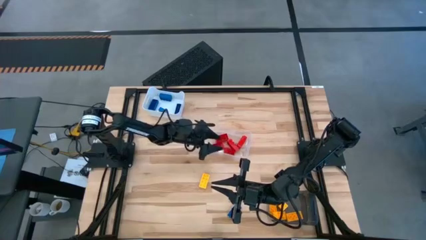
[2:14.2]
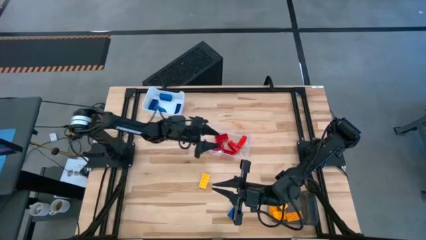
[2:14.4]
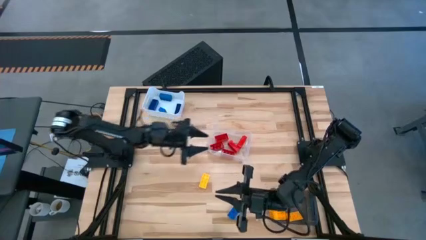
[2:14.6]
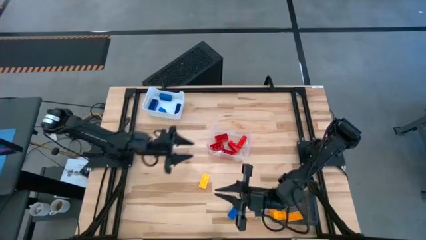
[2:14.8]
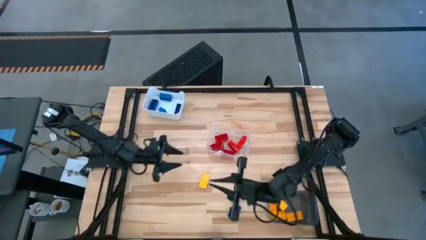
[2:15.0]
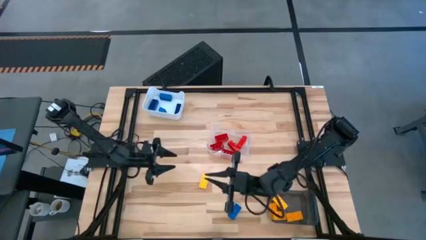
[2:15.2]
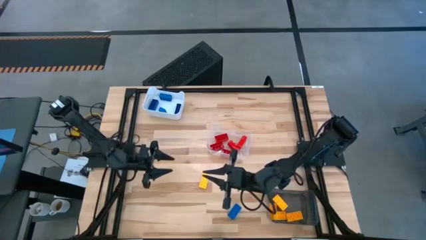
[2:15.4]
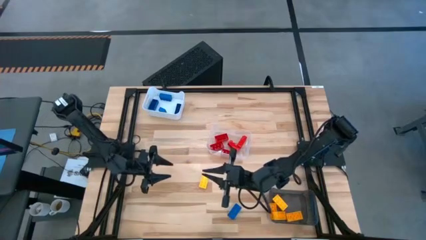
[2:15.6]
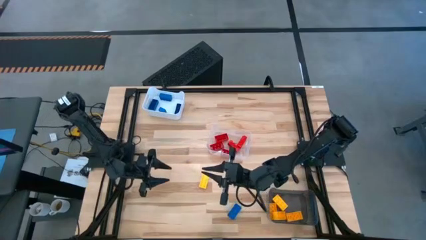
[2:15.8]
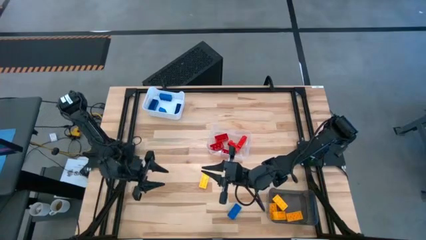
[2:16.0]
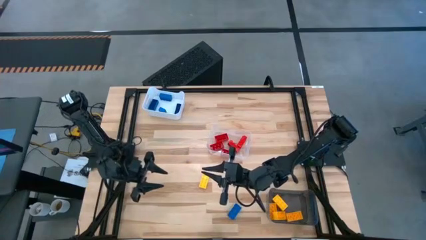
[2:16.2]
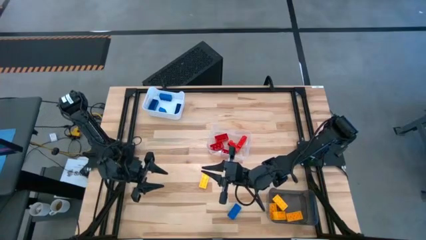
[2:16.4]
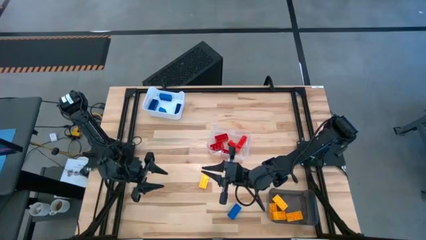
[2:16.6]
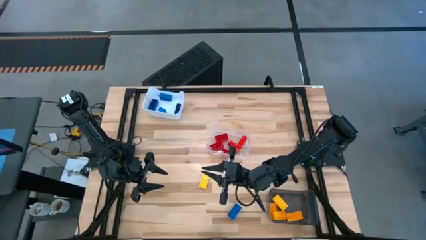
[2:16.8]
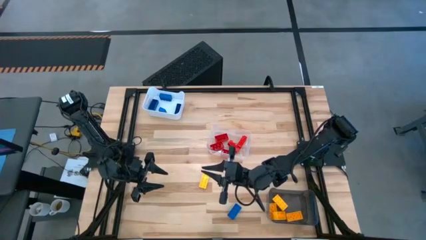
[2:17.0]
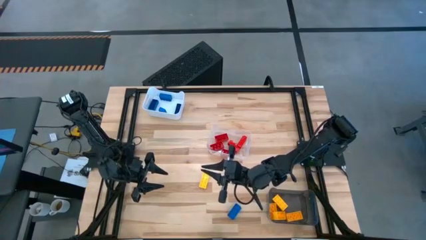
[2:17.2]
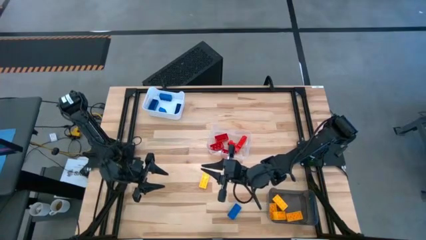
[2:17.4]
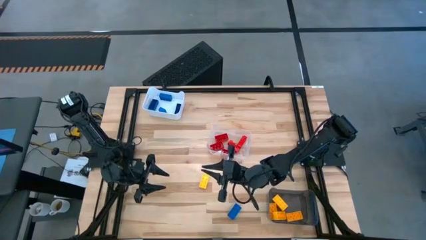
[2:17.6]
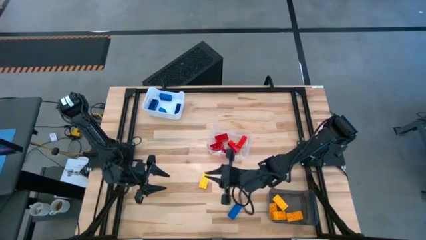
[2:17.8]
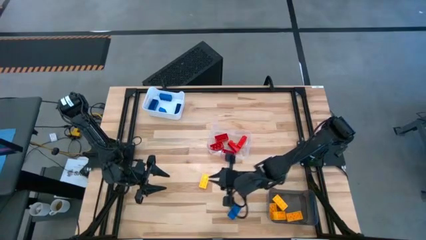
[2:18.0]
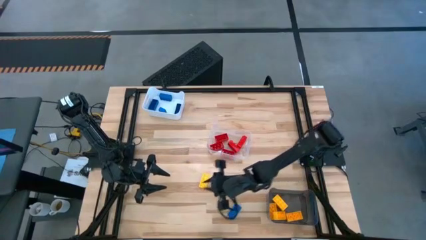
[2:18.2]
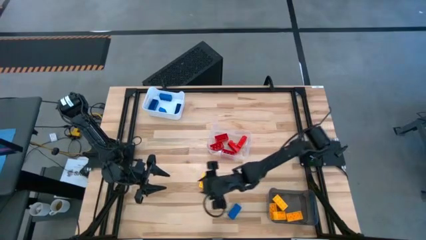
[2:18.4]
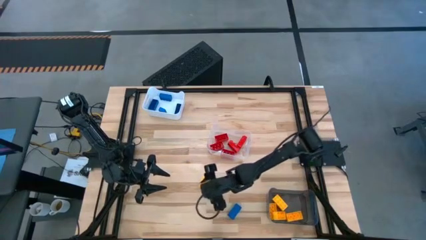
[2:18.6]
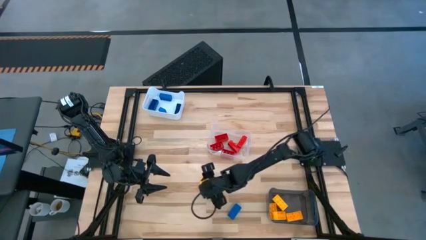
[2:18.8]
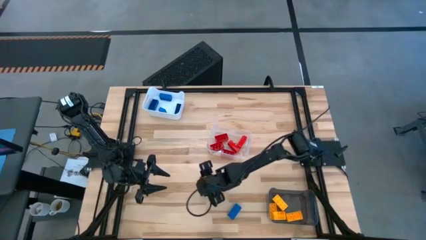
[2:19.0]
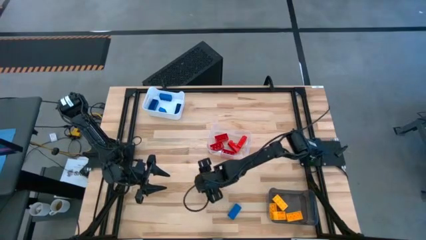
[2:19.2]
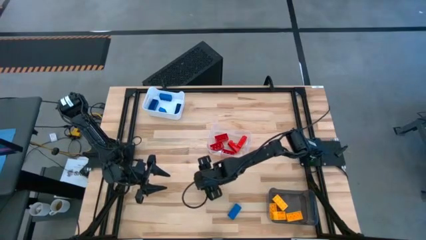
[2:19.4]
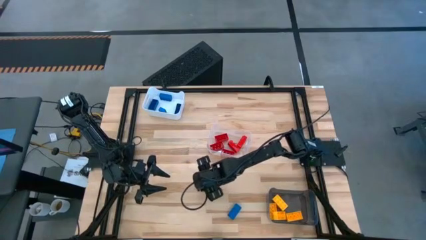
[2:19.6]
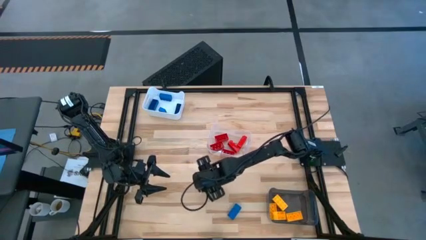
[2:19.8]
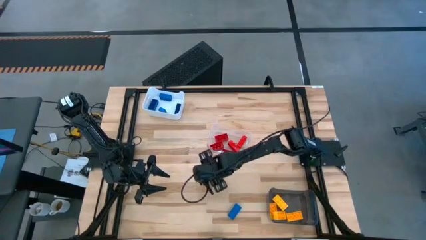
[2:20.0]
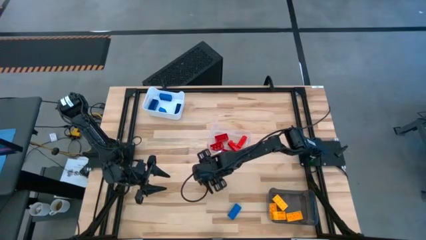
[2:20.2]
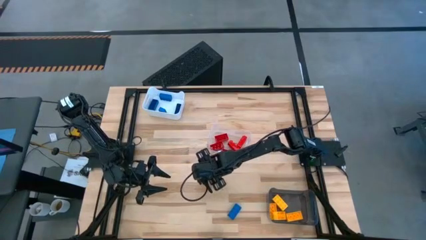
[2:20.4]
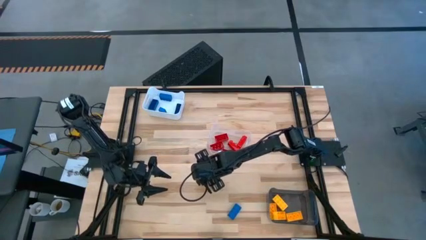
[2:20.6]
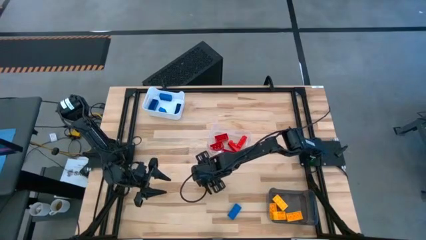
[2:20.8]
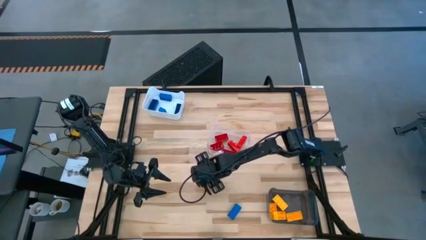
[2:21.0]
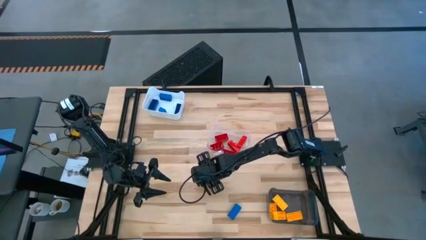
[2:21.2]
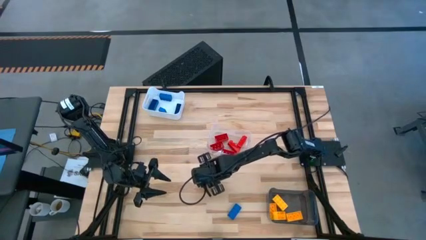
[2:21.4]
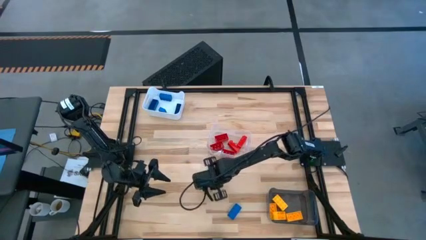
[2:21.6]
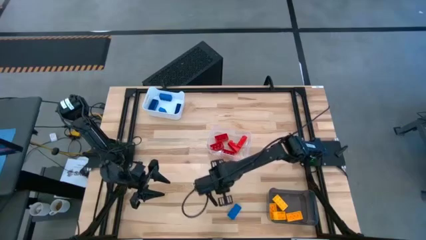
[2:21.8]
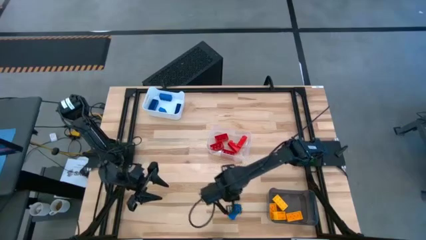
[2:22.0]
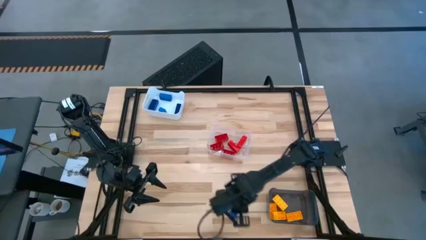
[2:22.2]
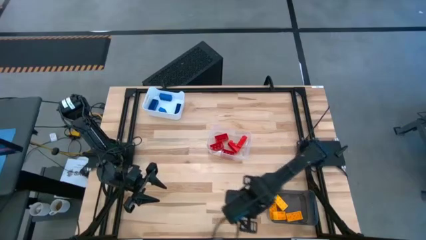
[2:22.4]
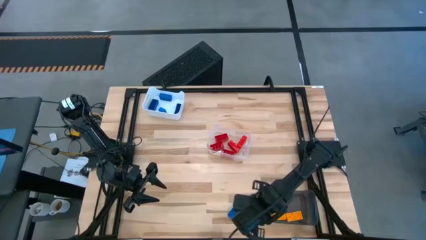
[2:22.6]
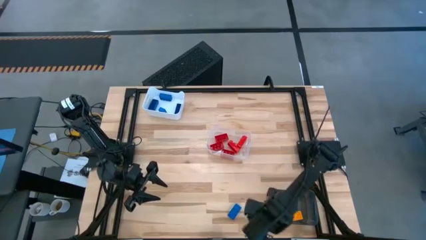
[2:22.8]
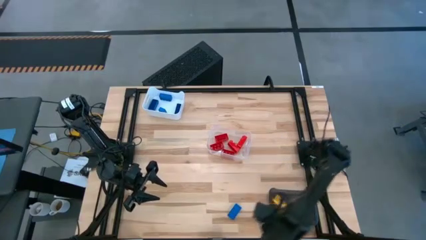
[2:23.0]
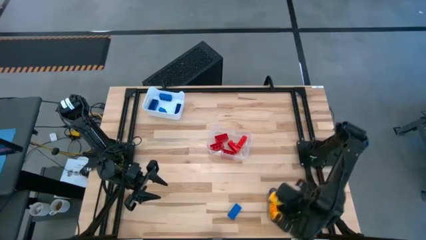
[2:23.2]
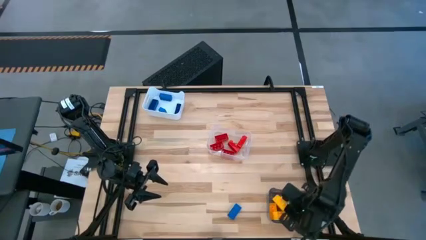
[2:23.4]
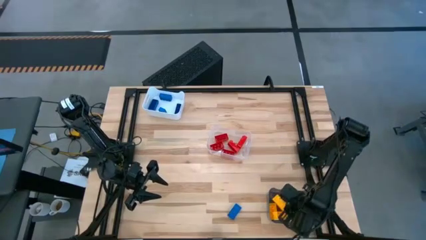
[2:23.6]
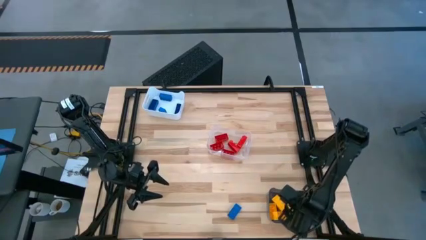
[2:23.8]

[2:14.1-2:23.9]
Task: Sort & place blocks by color
Put the yellow game piece into the black bin

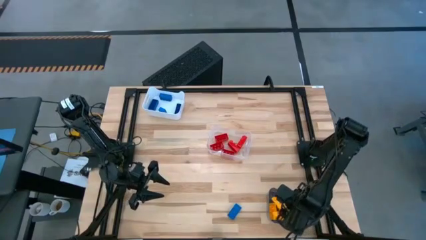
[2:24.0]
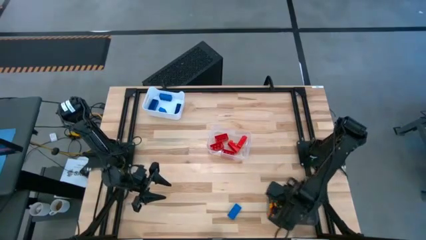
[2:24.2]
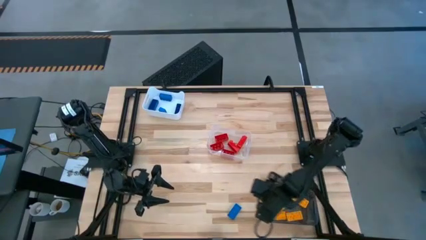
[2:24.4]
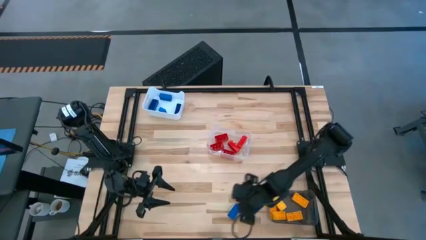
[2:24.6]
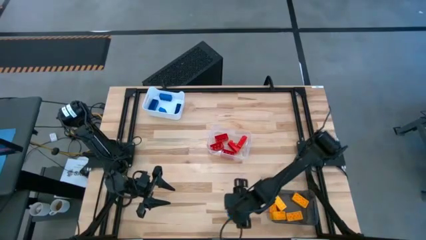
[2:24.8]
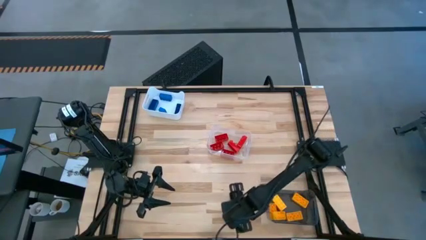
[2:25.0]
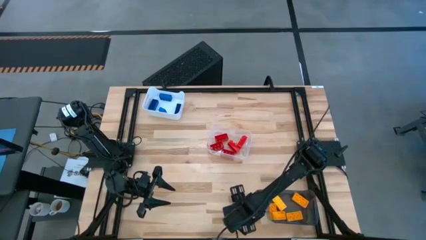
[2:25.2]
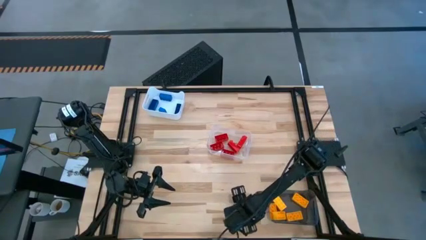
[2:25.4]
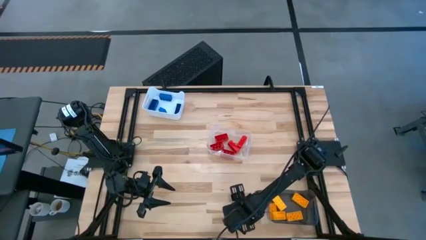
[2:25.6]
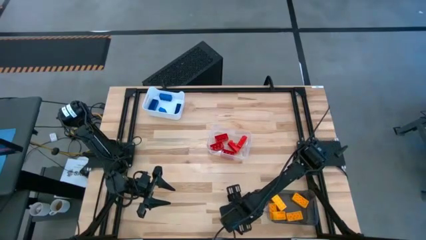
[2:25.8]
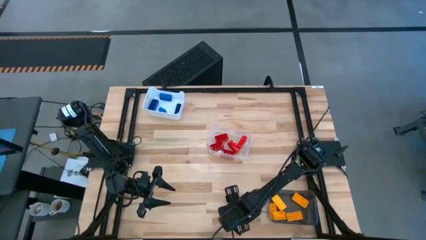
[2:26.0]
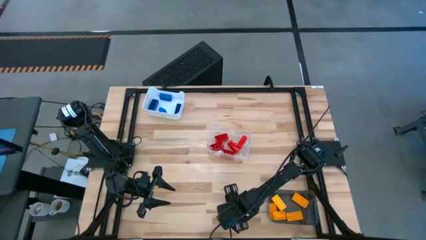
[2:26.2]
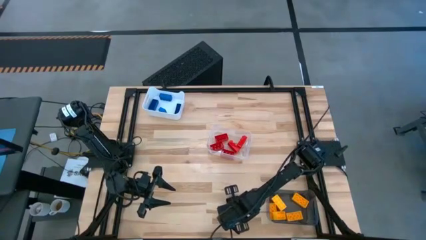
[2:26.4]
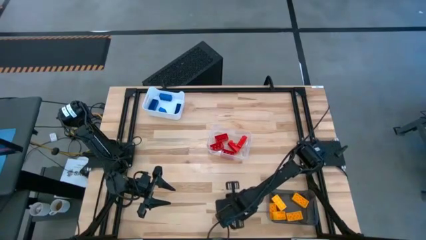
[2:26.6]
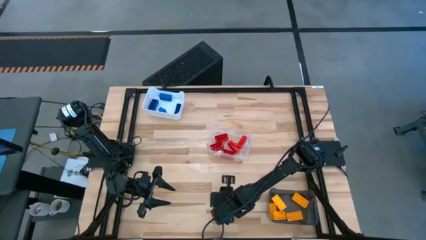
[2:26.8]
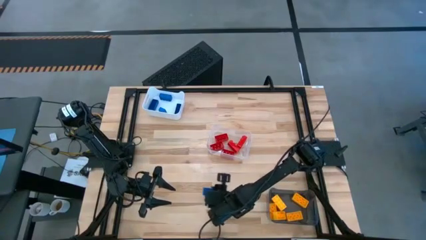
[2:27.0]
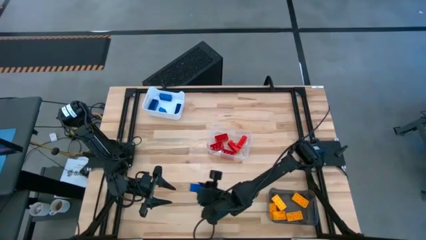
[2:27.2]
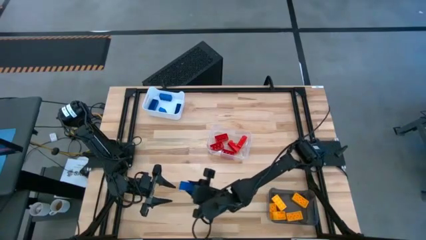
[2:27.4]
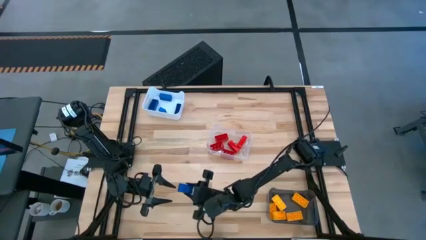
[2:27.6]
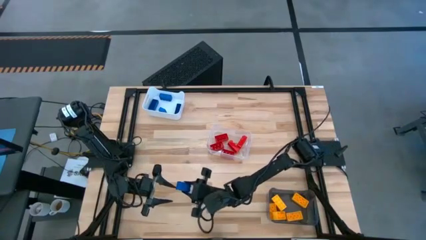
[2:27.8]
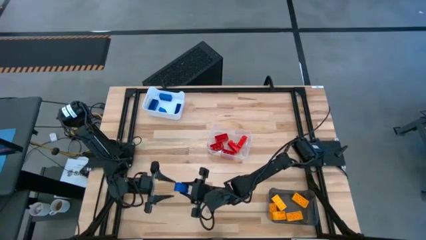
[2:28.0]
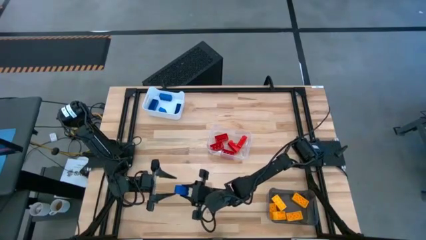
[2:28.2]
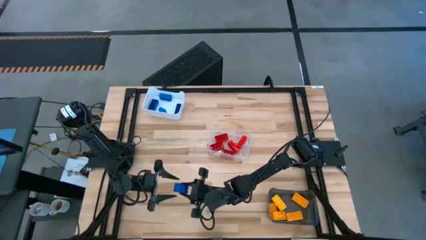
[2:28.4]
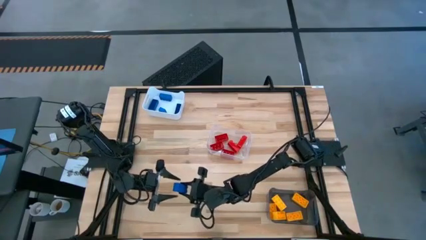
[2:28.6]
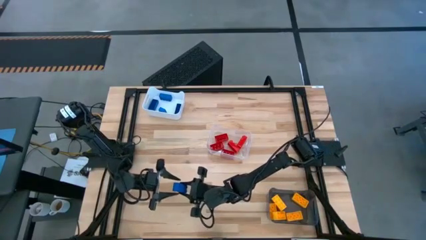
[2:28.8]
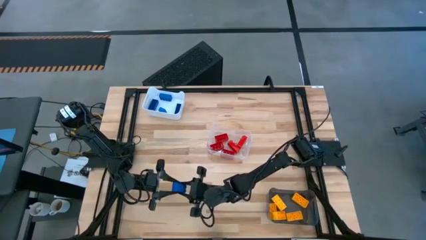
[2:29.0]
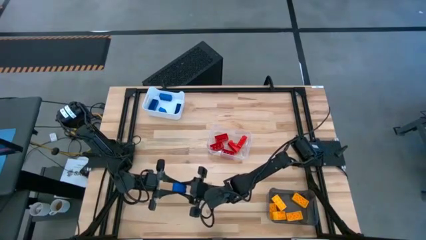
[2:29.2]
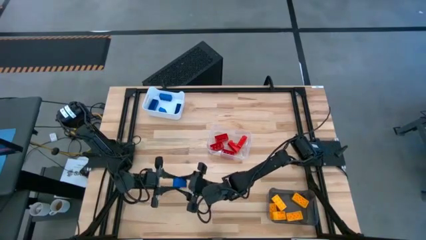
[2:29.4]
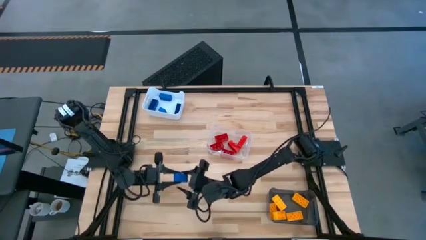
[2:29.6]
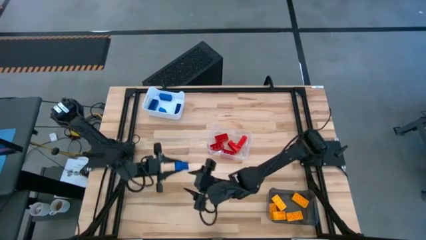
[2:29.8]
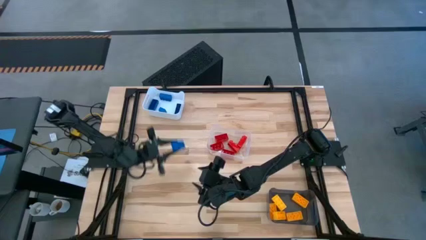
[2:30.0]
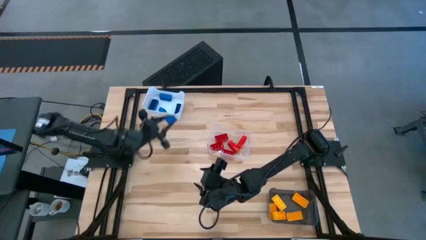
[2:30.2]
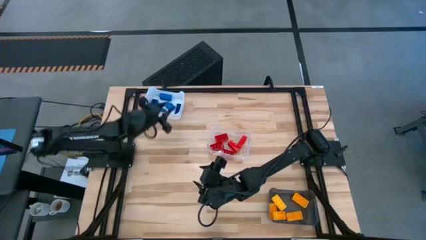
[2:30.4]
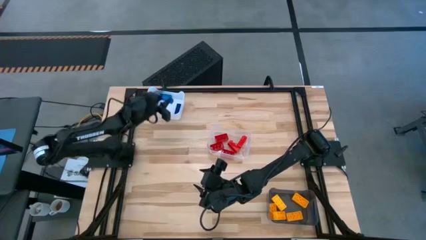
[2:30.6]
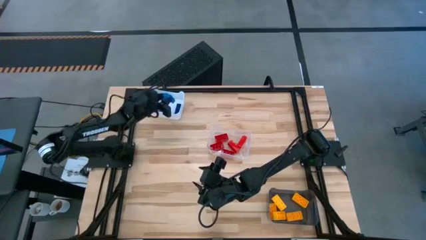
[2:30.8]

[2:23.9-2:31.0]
Put the blue game piece into the white bin
